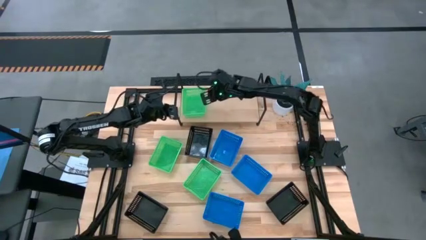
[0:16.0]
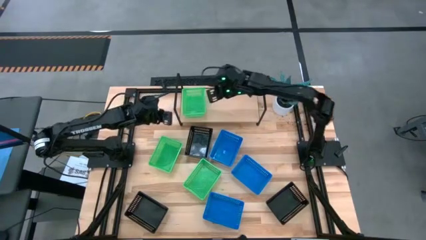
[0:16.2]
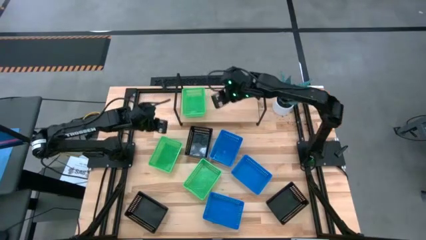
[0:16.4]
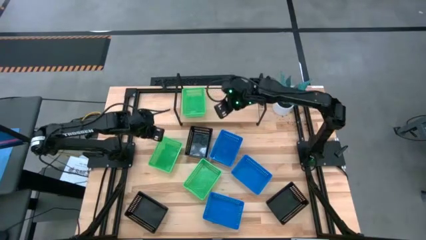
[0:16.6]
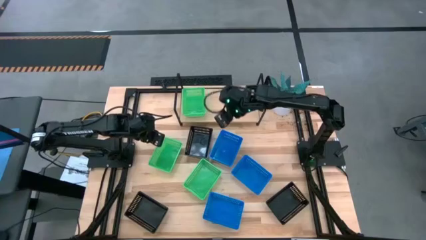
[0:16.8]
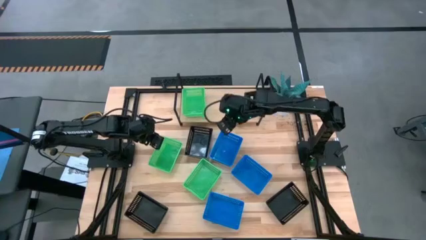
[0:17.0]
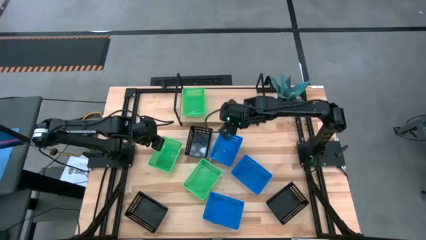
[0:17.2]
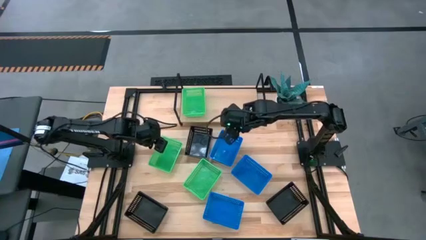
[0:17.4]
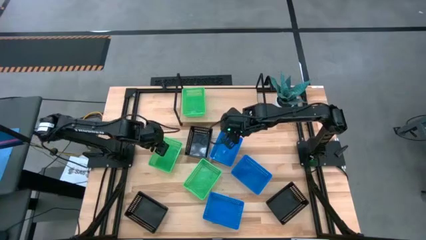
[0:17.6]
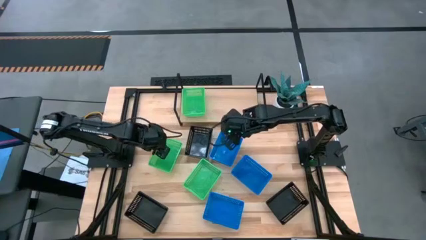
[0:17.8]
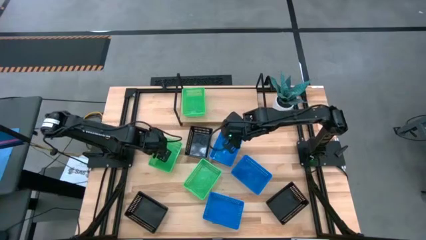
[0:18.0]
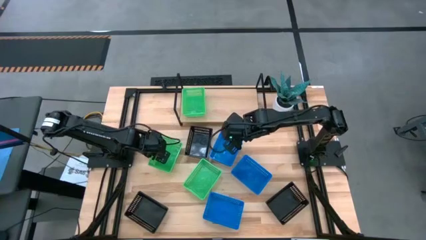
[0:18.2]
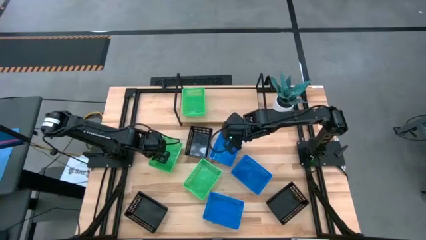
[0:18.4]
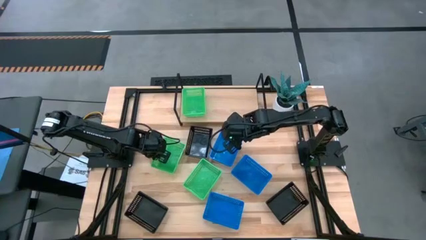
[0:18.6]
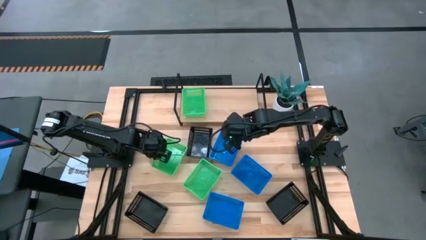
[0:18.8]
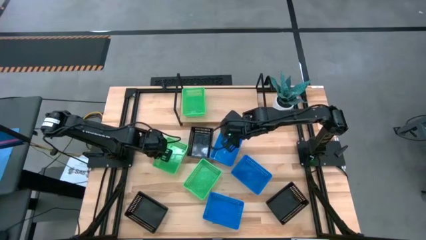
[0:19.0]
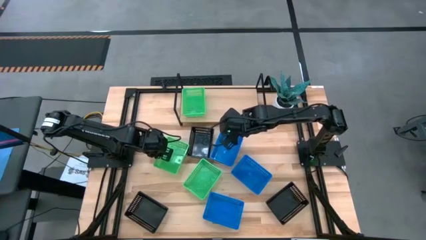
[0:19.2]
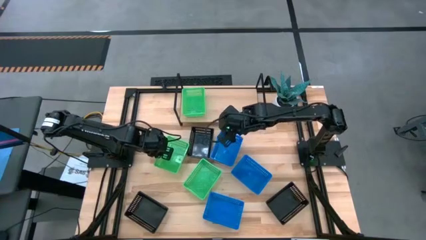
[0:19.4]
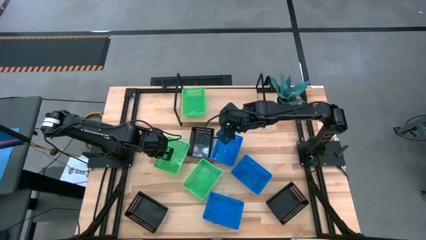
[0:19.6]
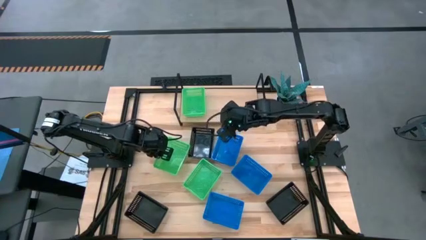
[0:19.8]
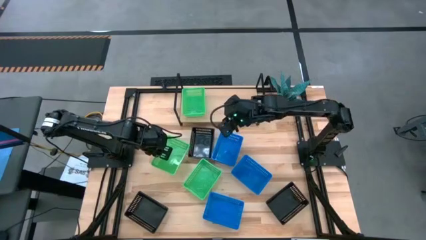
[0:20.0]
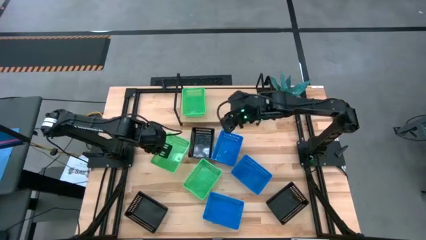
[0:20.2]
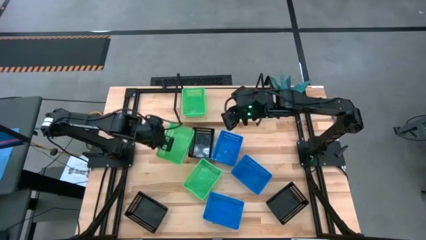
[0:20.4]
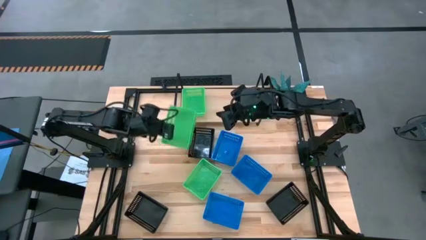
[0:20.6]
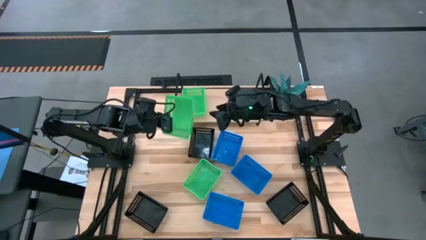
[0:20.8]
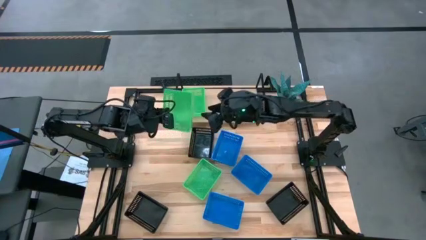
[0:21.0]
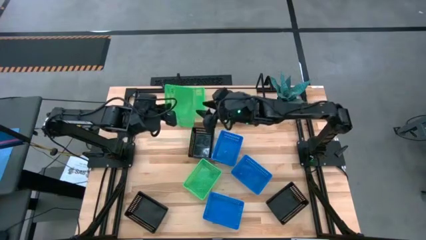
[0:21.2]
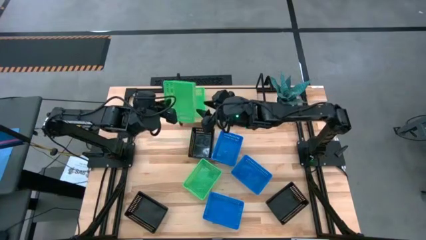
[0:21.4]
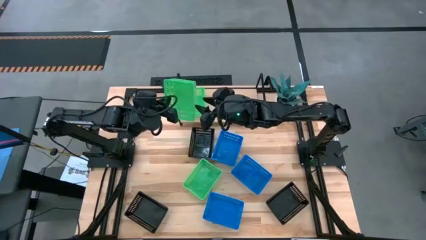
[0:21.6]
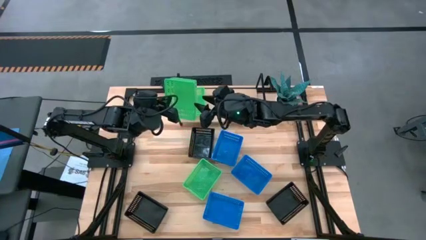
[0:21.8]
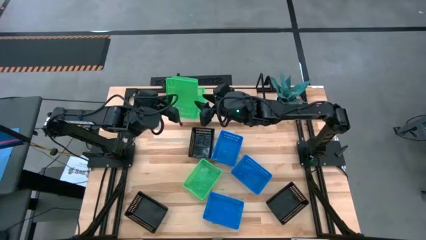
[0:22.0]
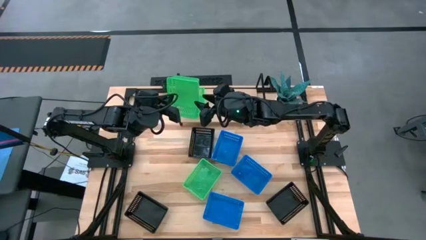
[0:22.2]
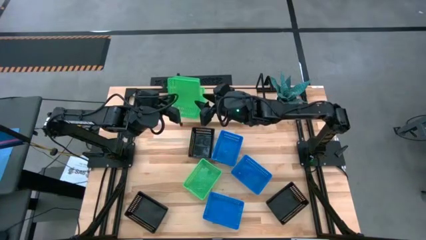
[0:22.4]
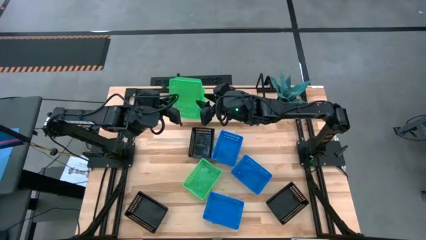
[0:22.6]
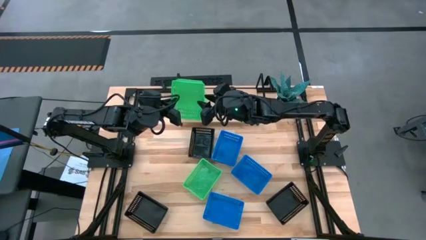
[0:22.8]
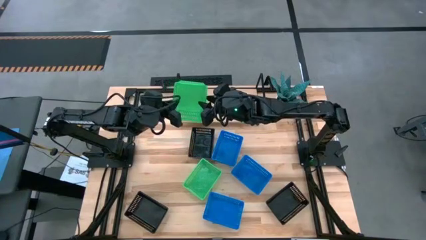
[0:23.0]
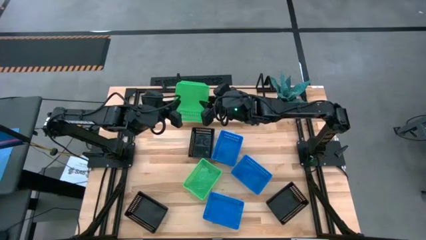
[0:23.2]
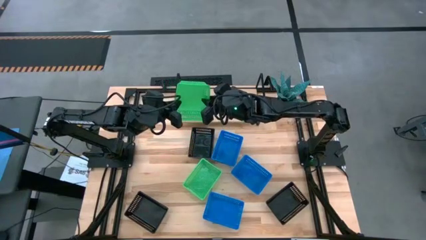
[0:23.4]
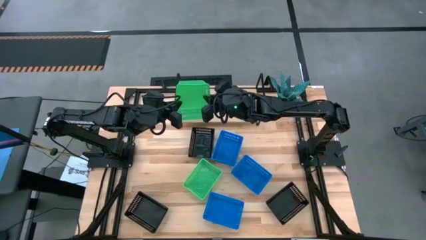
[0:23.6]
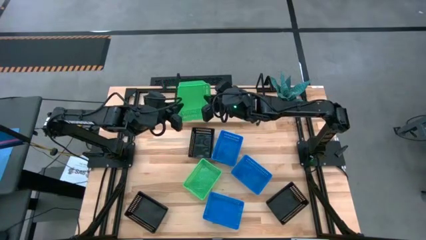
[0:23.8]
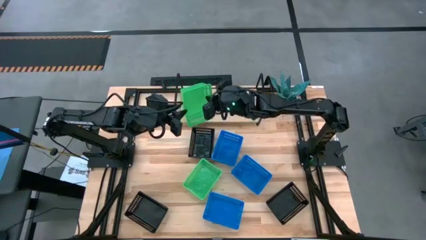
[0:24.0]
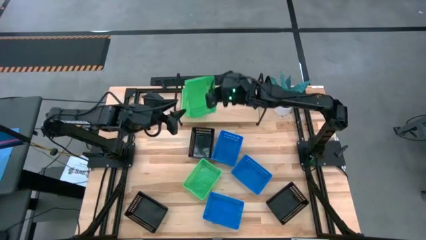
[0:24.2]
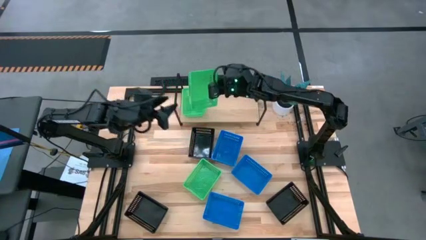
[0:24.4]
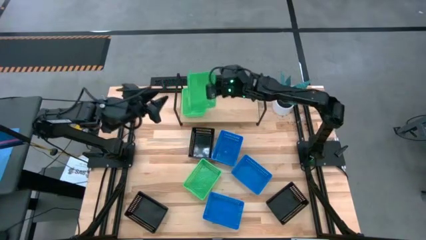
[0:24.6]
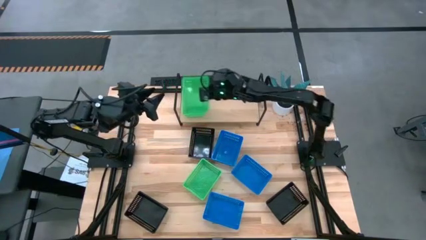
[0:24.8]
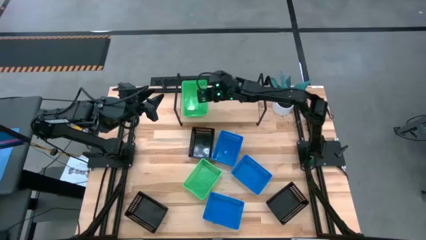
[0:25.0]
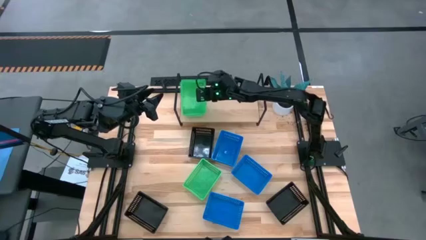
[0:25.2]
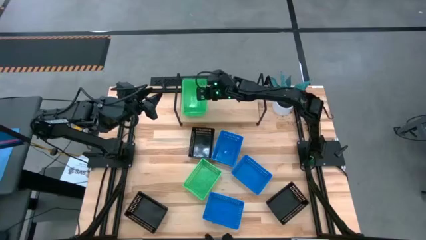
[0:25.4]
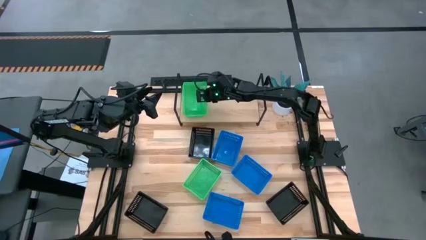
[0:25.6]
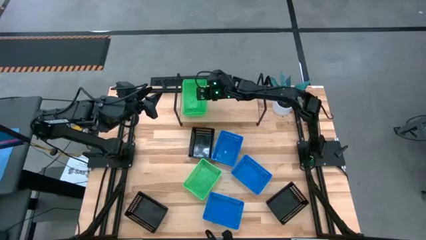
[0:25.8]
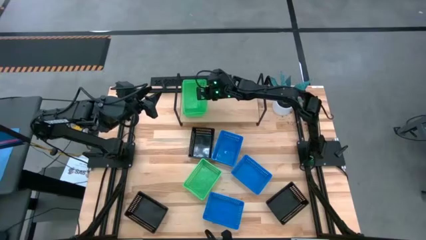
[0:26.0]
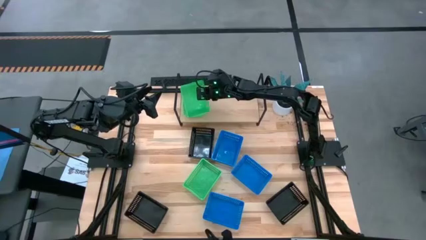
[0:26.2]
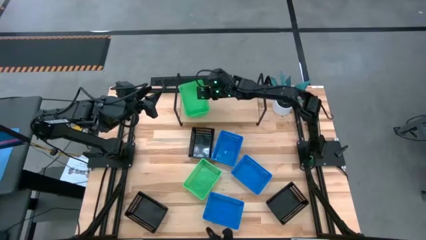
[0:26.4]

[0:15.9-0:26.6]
Task: Stack baskets on shelf by color
Stack the left green bin on the other green bin on the shelf
